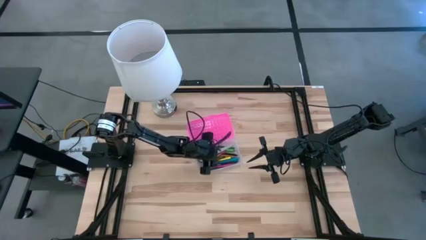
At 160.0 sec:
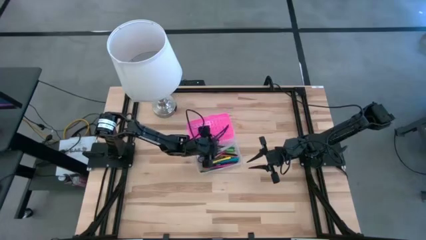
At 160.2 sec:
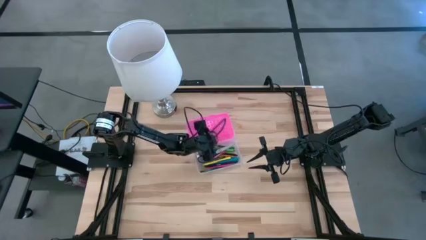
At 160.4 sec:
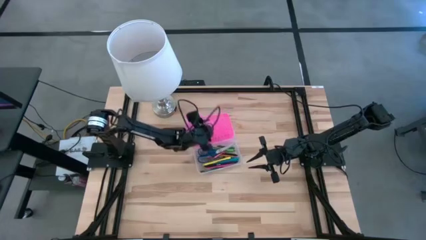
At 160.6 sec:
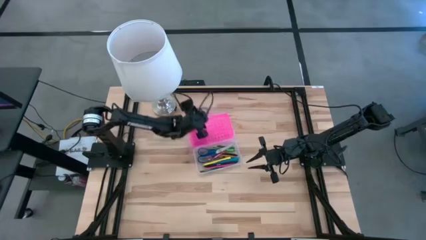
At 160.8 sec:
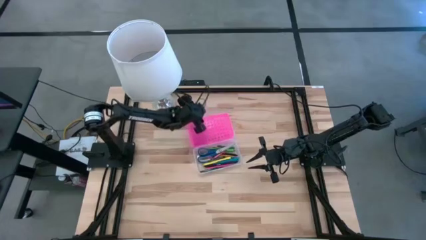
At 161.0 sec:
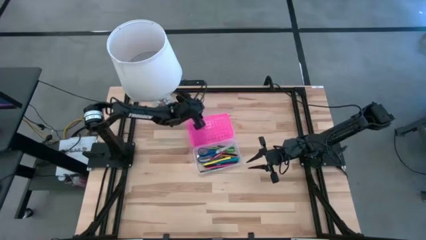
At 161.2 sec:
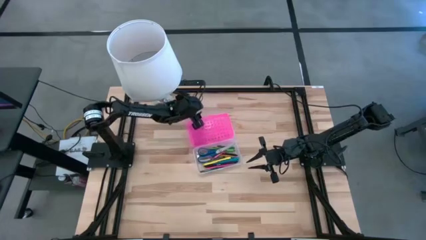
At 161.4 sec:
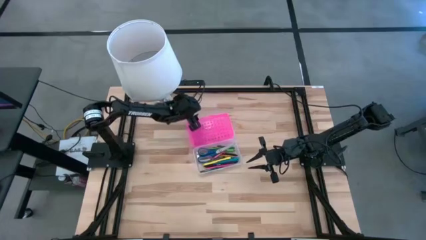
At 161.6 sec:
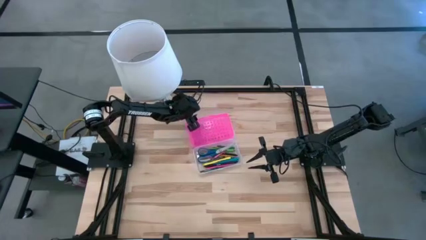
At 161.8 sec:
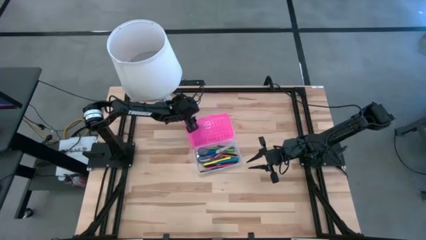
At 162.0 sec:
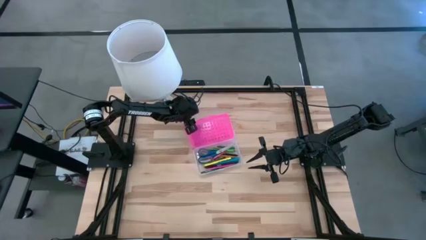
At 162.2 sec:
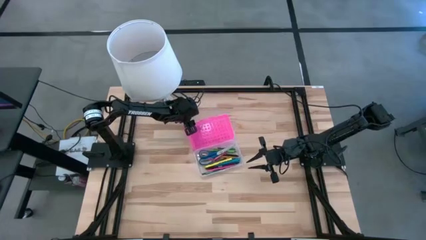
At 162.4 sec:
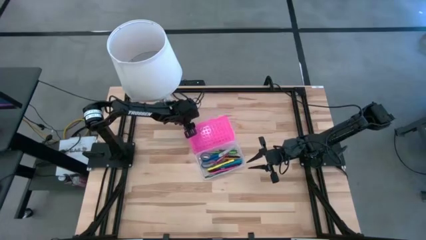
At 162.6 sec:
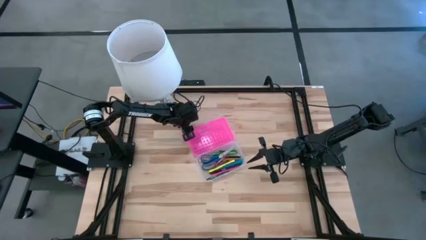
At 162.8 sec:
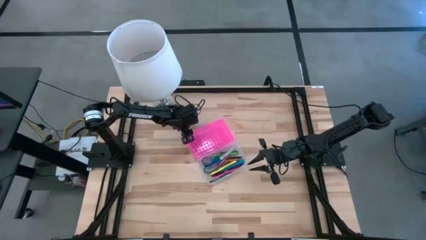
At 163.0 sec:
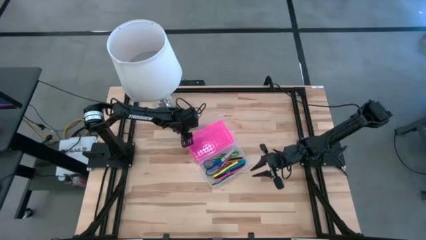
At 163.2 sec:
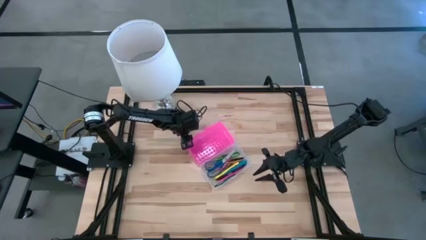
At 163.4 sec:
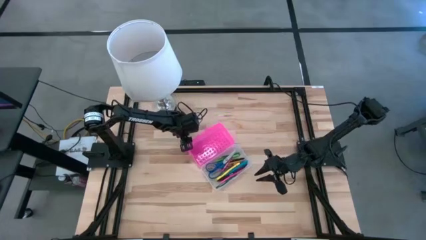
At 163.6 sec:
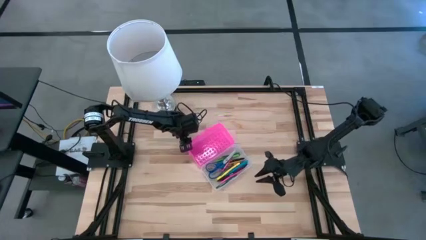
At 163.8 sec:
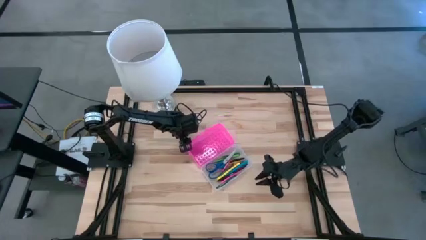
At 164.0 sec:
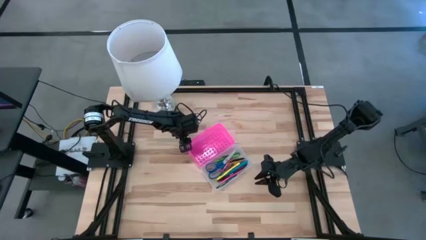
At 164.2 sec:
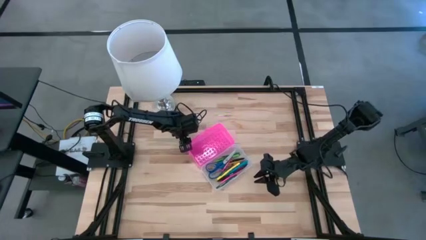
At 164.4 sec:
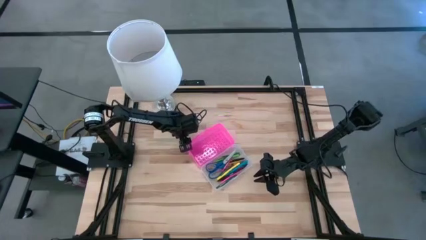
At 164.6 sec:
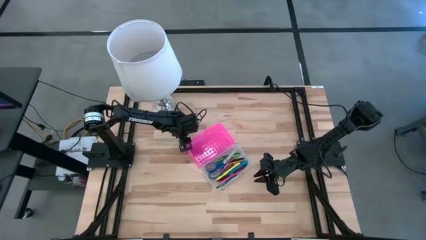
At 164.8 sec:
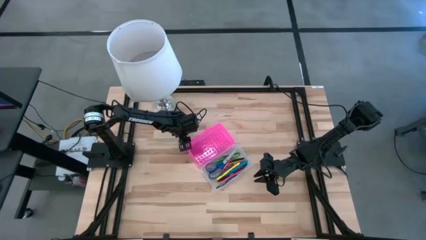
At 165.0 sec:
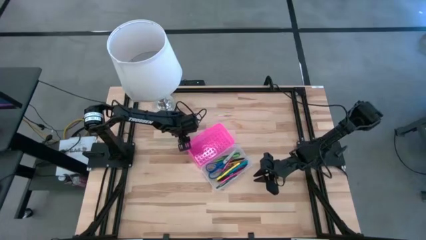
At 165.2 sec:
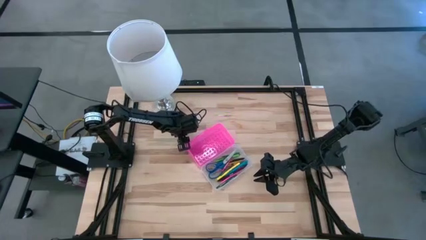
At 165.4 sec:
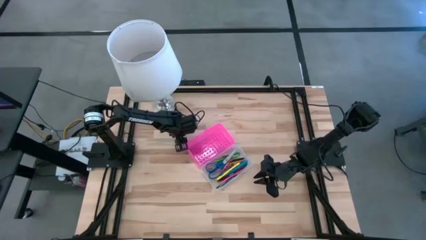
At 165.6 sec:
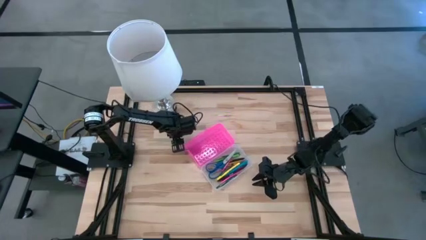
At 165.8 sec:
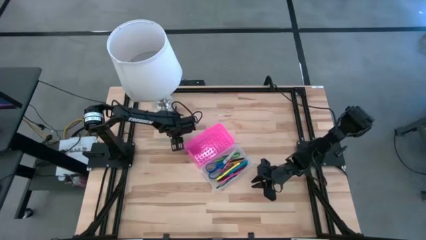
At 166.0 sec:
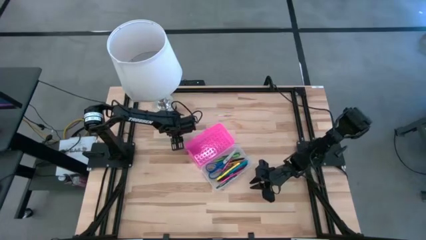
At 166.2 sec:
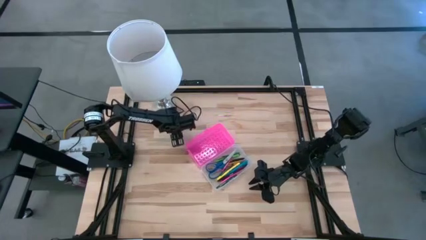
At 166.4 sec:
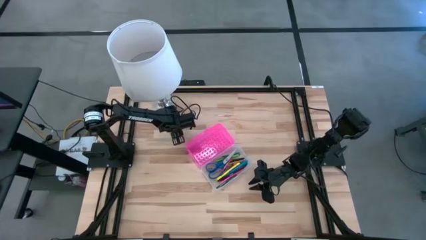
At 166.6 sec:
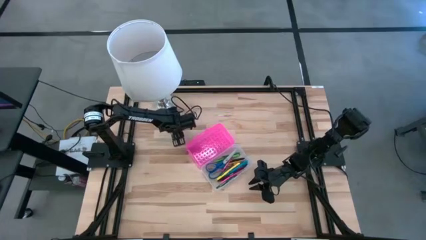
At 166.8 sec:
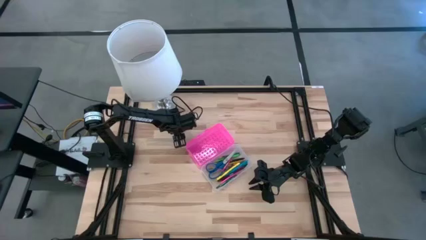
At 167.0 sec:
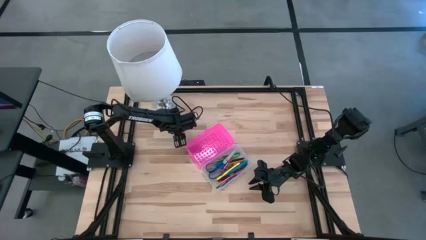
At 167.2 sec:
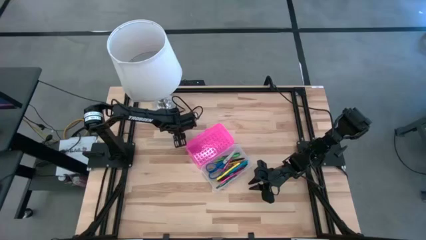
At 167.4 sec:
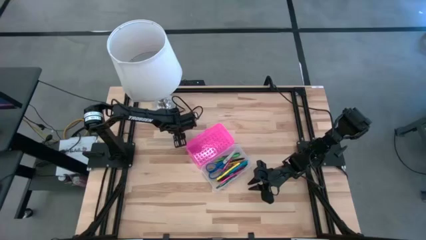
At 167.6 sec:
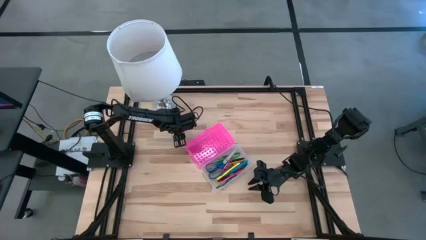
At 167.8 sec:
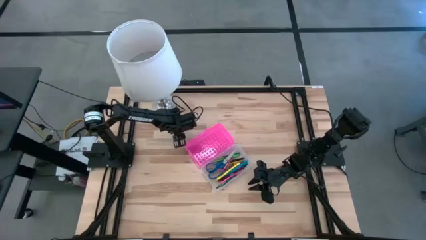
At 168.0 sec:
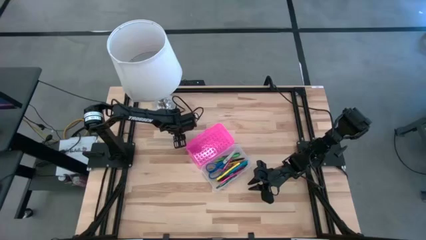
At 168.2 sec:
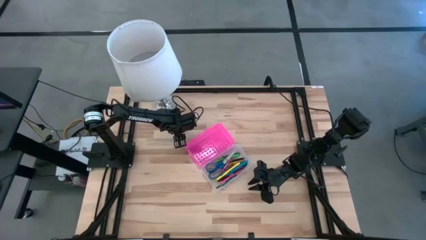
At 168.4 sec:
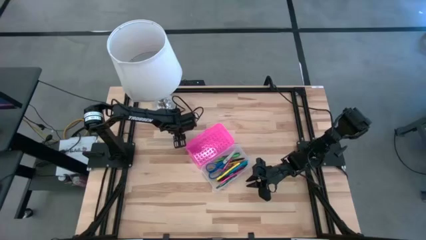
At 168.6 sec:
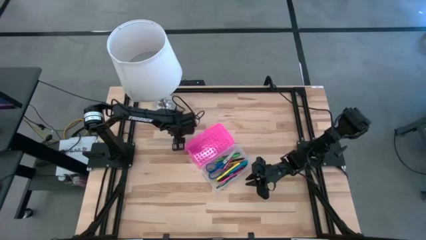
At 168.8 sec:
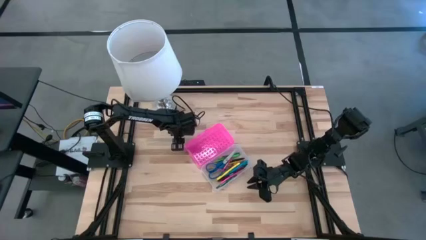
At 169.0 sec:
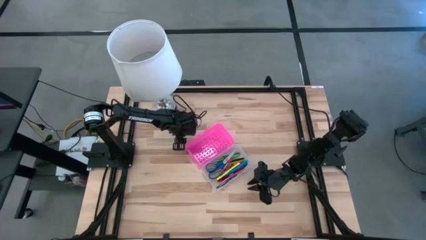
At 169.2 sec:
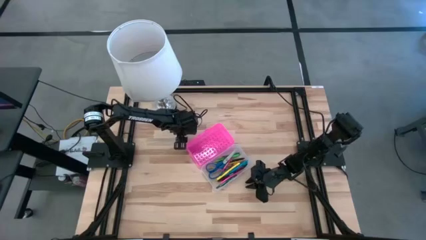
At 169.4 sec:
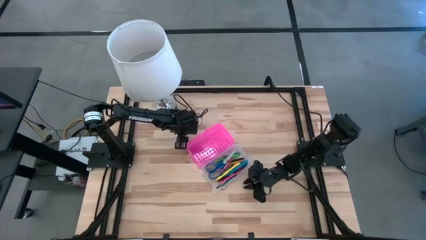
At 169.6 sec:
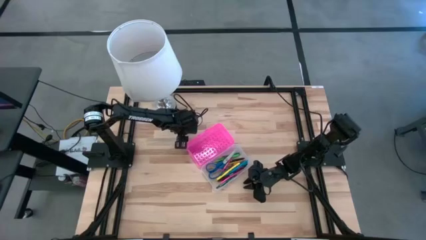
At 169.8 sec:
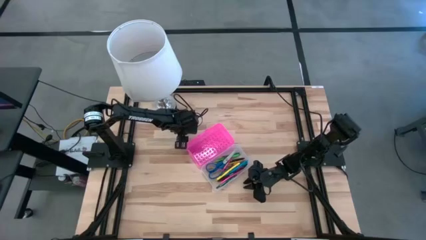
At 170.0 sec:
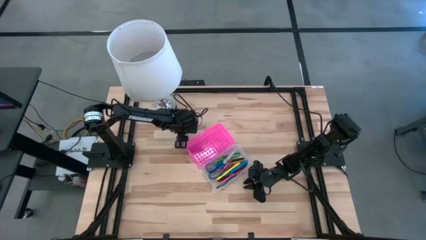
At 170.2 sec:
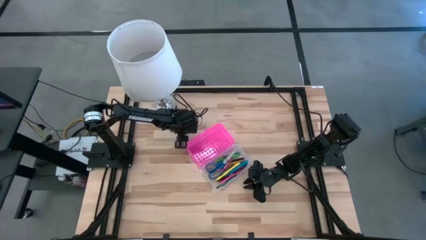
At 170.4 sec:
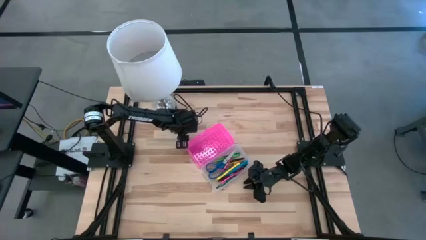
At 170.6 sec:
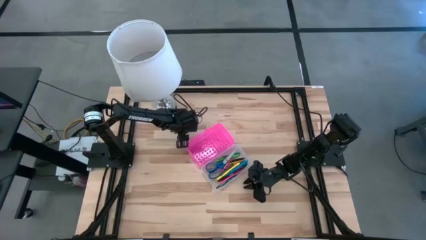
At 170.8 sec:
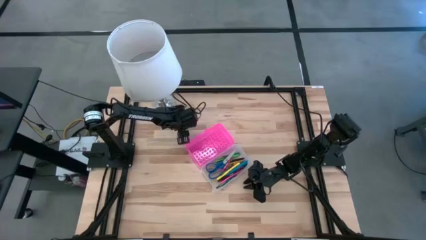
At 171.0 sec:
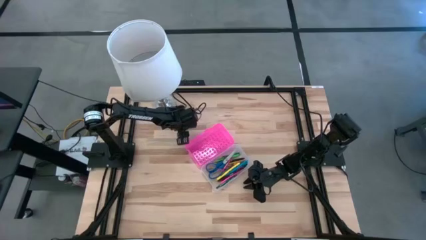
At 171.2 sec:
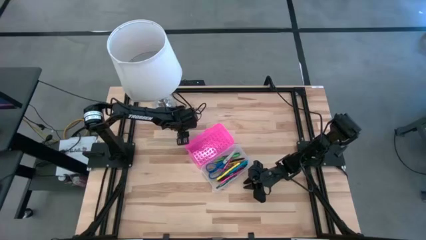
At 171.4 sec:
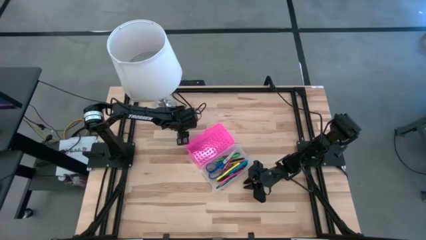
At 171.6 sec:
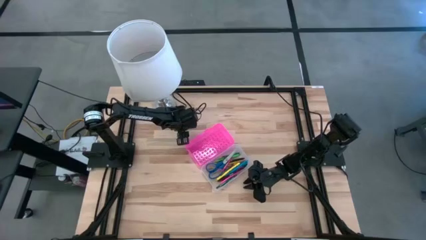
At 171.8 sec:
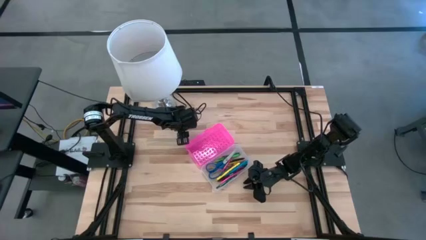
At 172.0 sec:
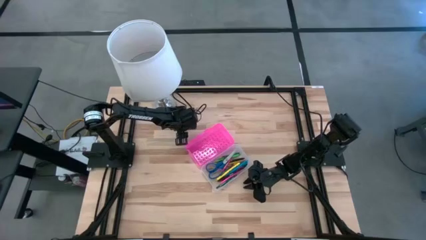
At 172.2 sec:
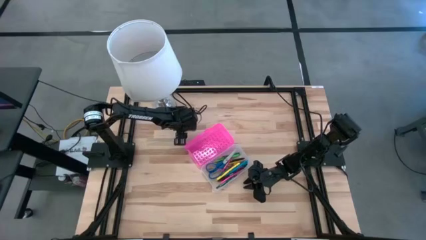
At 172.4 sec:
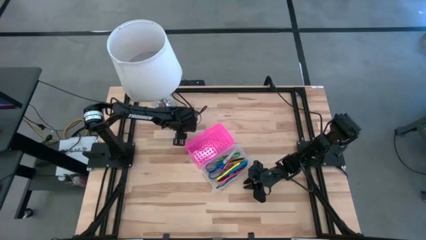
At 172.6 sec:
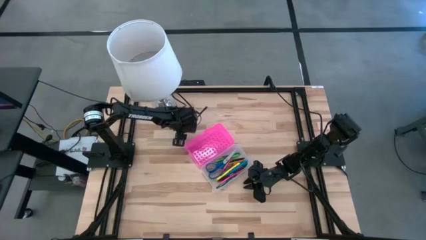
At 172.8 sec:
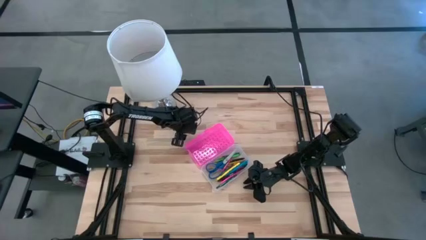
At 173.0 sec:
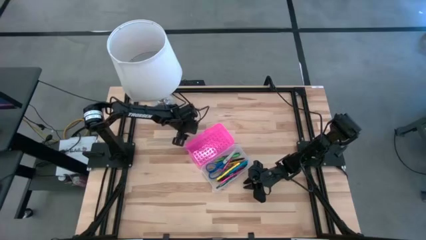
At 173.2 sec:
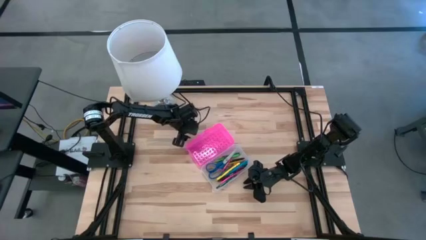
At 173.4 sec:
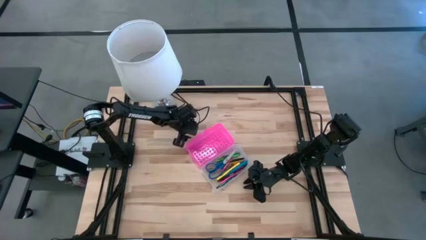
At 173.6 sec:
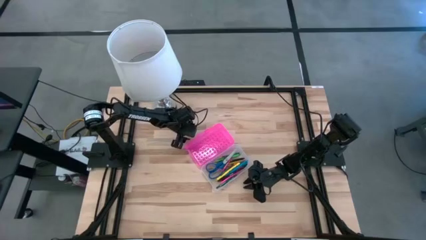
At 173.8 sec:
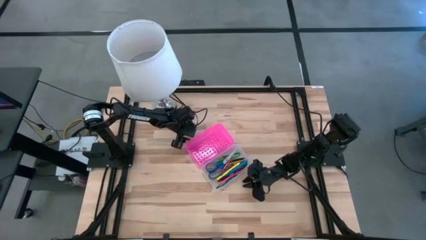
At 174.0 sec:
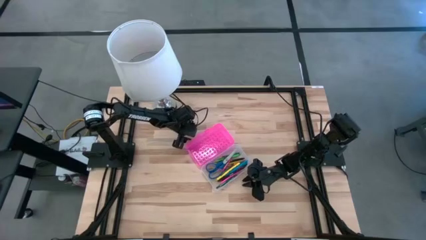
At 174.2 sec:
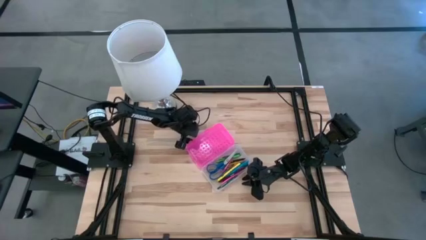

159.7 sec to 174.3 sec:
Task: Pick & place school supplies into a supply box
Close the pink supply box

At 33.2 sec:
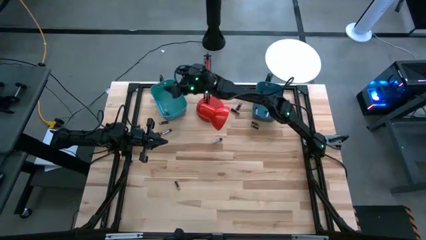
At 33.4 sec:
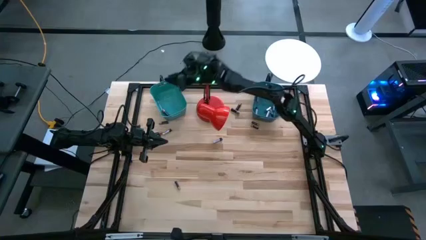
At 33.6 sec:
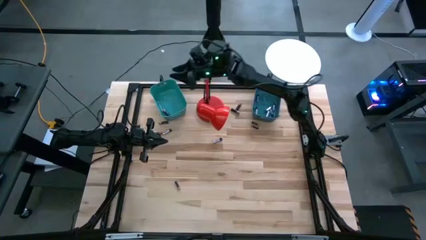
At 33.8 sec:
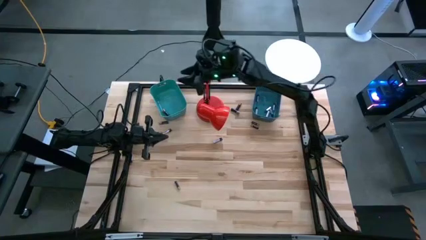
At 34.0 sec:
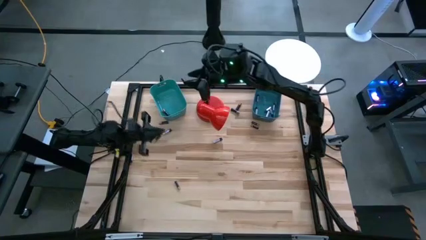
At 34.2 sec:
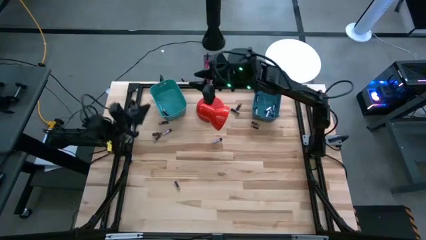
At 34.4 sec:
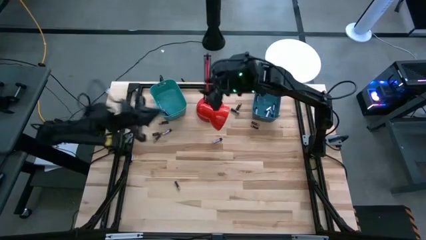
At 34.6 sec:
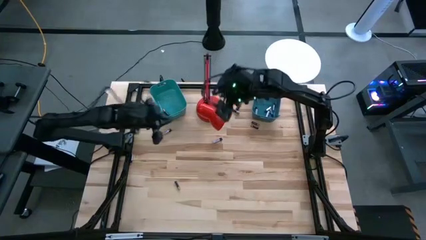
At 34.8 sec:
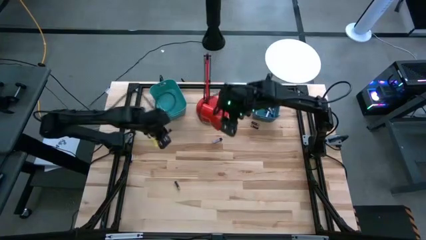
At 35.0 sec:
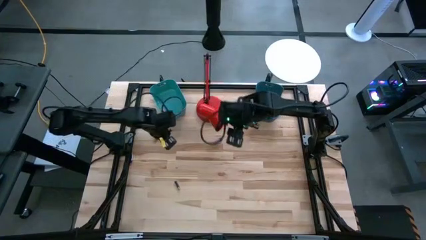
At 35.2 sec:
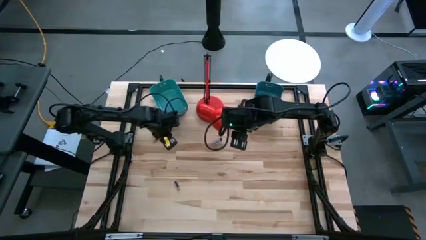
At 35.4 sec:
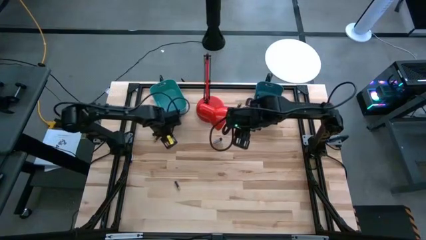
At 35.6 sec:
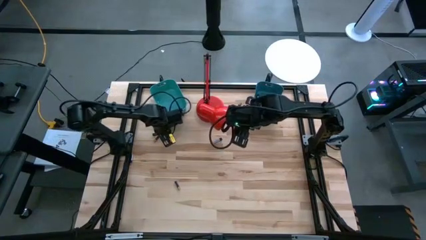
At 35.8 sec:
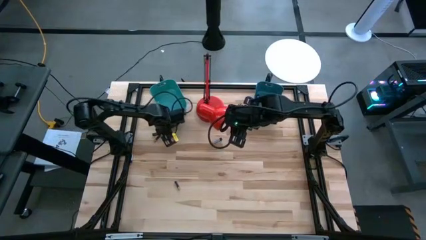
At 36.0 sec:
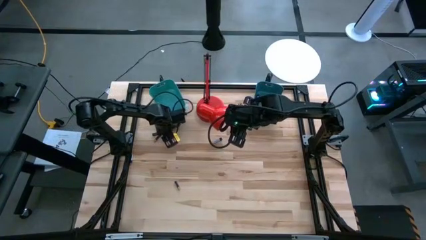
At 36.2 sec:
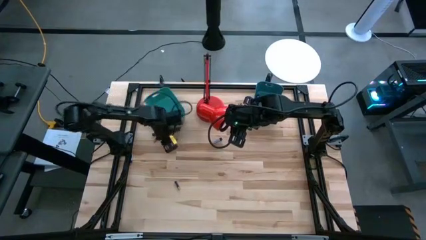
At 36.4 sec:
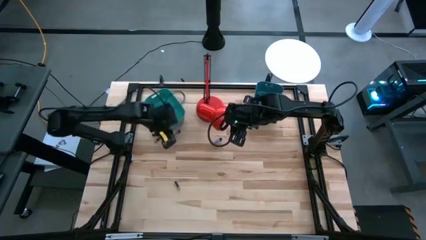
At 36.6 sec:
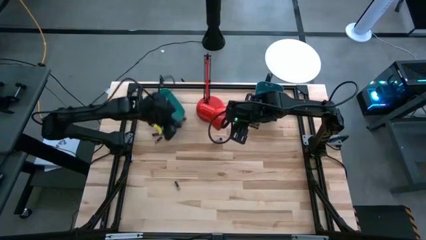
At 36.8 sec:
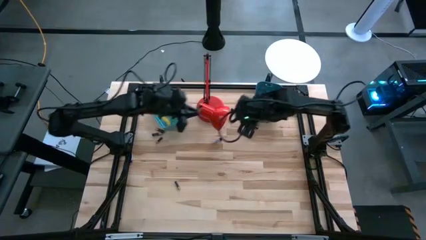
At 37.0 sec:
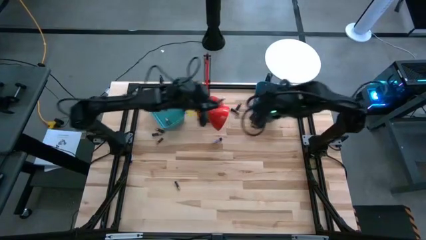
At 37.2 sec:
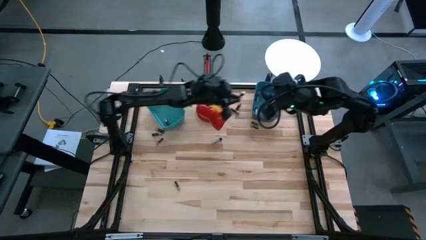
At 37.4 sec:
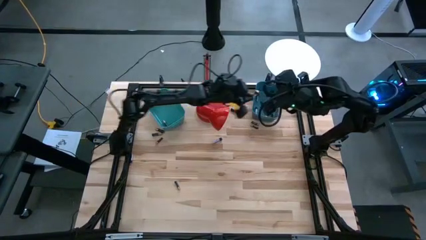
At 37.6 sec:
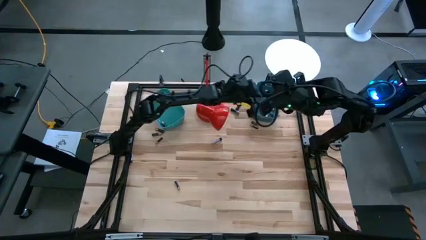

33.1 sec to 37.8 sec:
Task: Sort batteries
Put the silver battery into the blue bin
